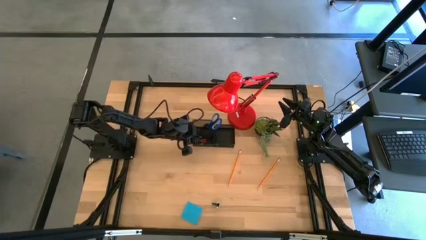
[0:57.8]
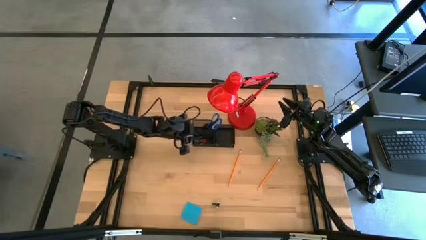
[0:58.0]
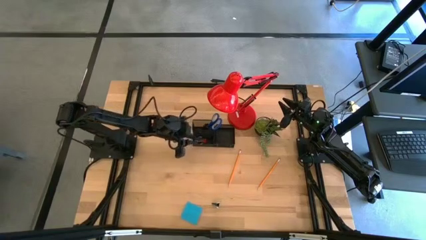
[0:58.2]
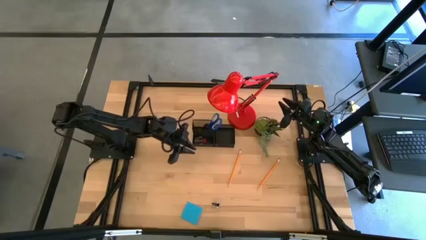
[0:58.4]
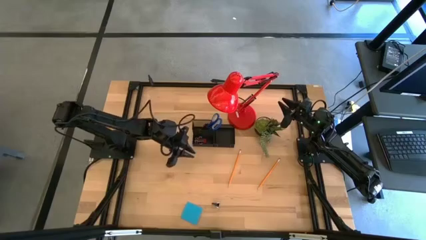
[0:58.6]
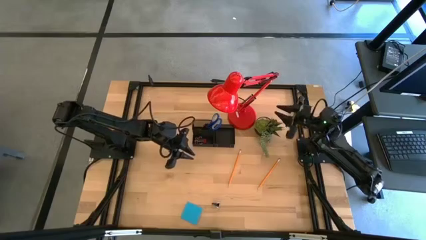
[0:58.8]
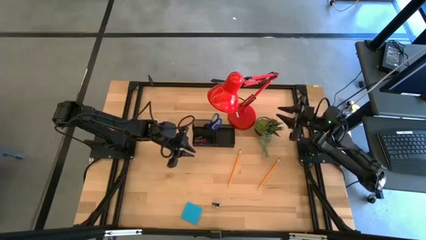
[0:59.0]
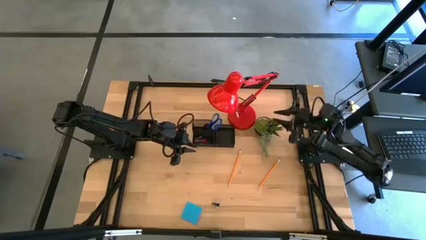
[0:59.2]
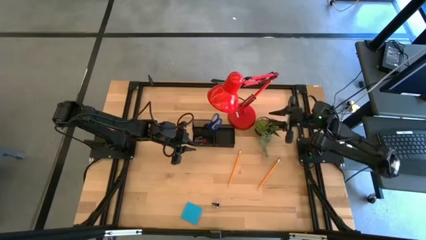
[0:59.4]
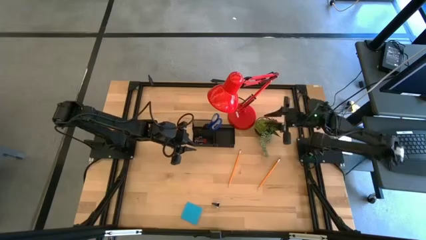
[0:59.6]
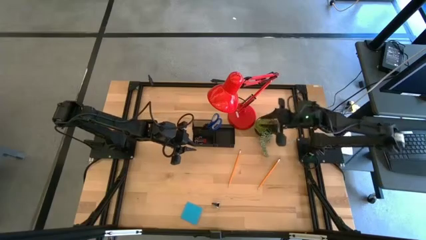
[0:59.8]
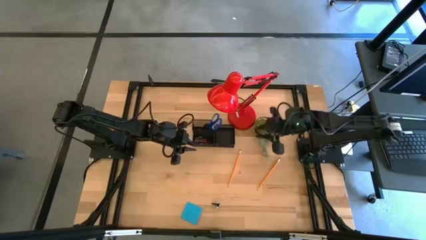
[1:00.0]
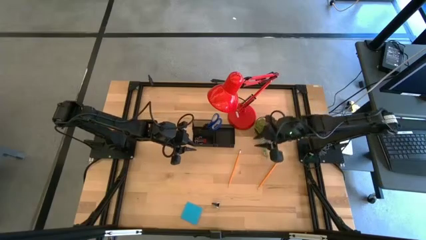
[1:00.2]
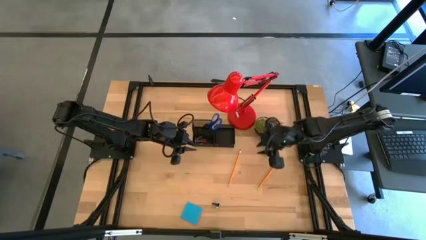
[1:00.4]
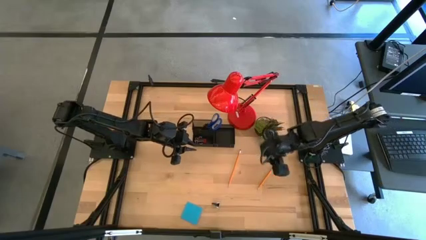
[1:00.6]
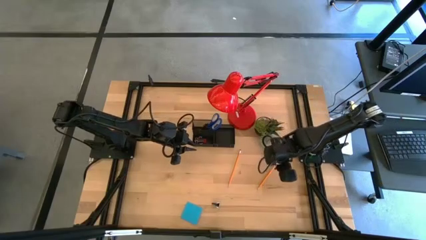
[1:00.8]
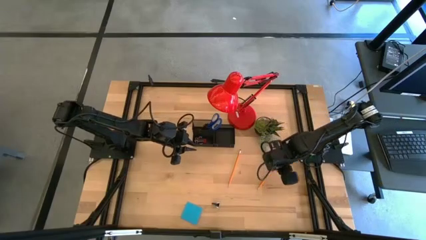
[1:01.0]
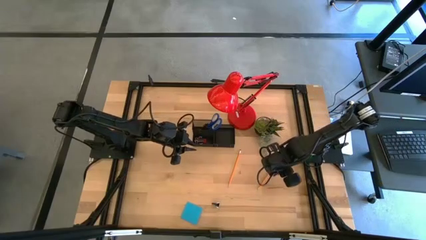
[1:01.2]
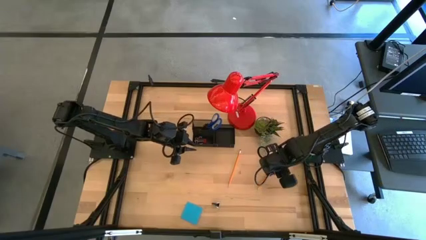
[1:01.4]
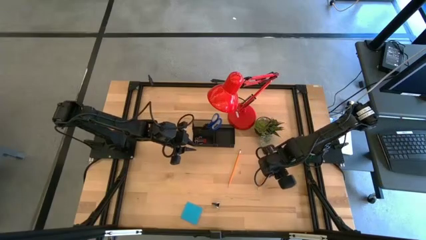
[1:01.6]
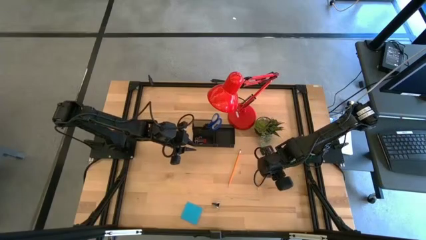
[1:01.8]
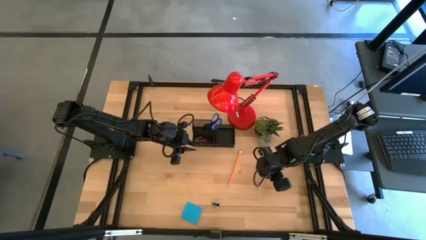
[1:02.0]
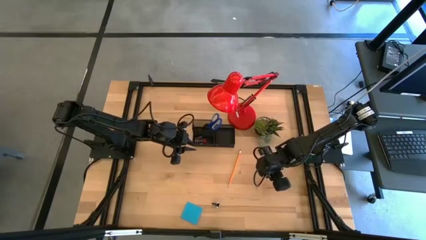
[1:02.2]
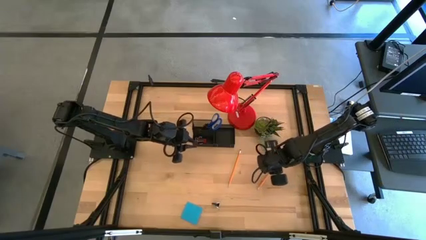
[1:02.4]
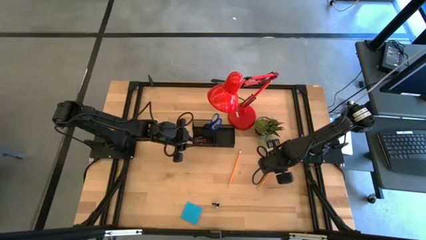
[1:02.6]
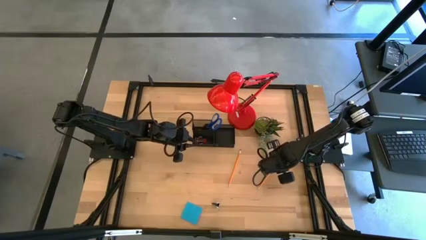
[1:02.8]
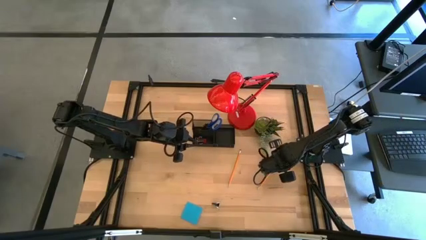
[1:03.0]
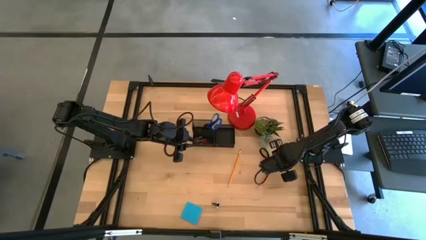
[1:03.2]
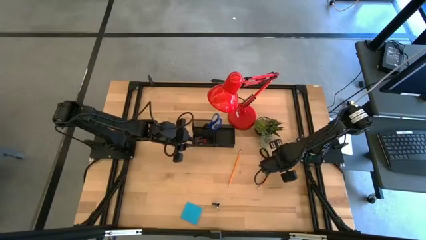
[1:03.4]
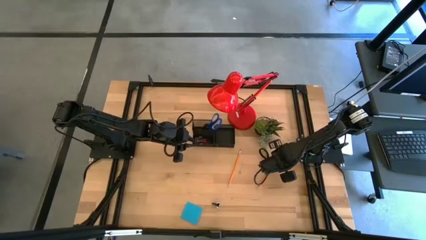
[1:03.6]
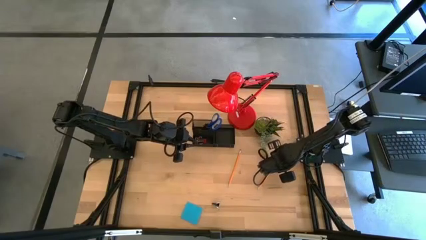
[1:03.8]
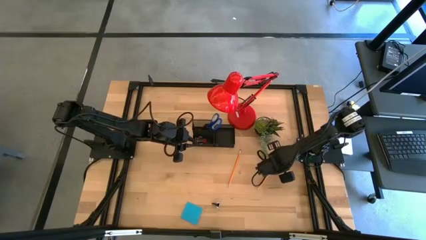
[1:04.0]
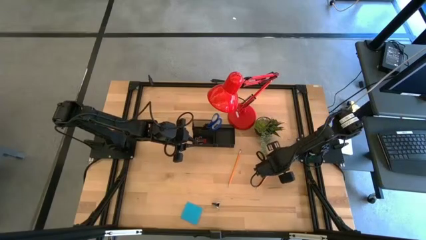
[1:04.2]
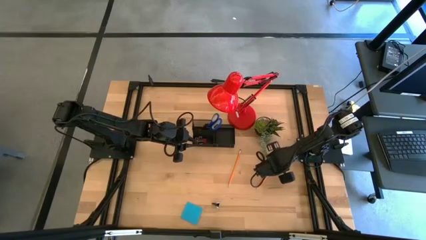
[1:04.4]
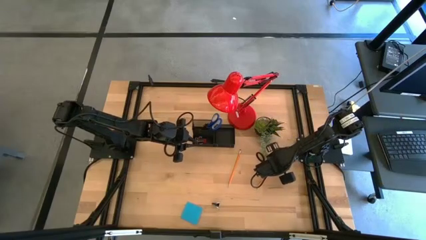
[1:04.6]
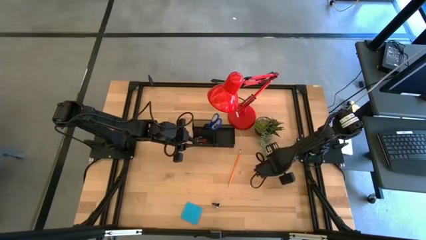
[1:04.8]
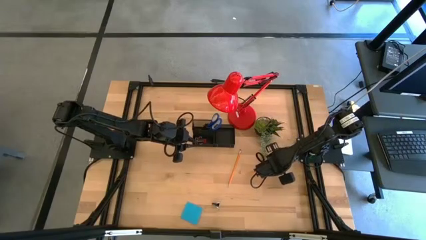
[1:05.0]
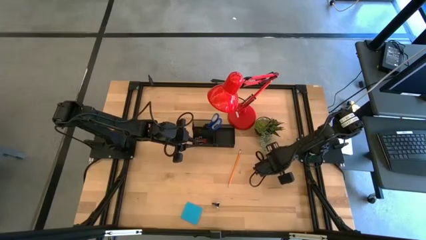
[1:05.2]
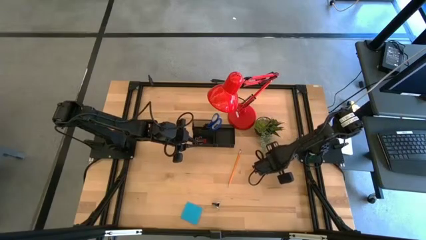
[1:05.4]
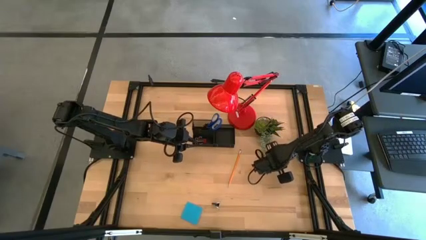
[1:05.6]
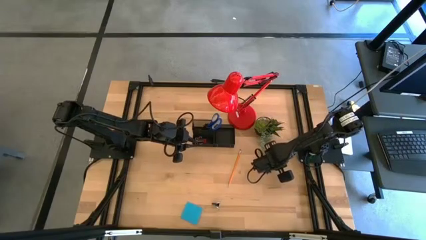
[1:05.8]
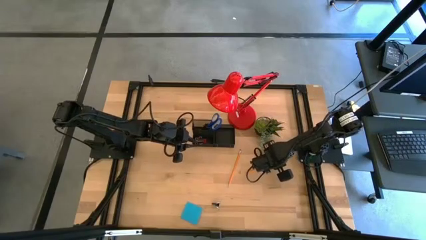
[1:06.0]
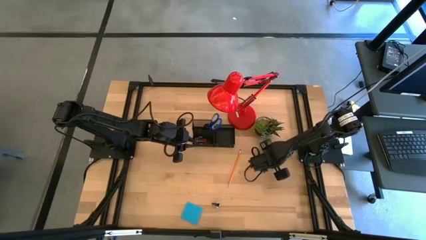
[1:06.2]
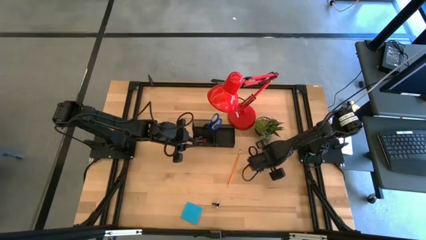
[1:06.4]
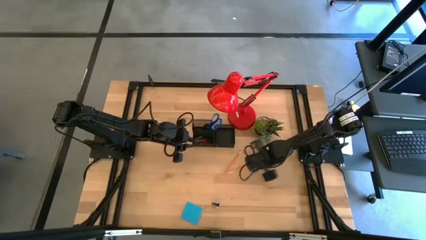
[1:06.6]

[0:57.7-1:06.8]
Task: Pick and place office supplies into organizer
Put the right orange pencil into the black desk organizer

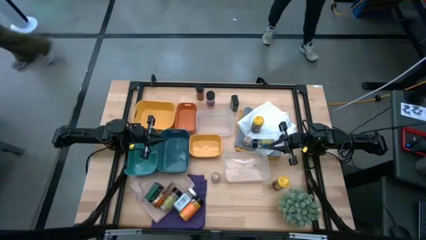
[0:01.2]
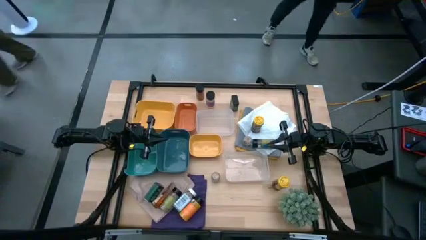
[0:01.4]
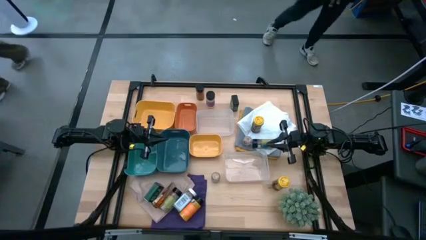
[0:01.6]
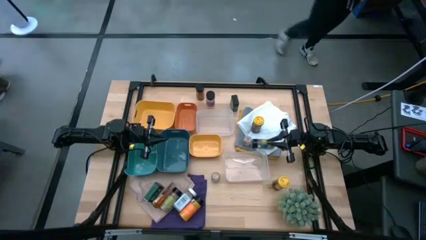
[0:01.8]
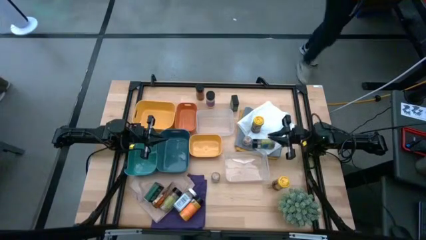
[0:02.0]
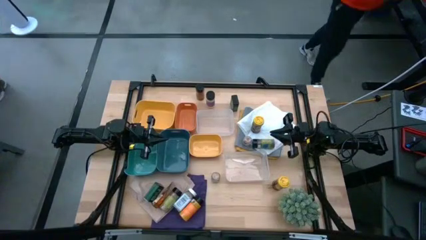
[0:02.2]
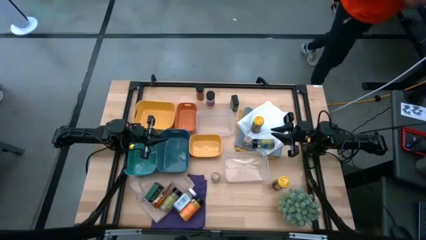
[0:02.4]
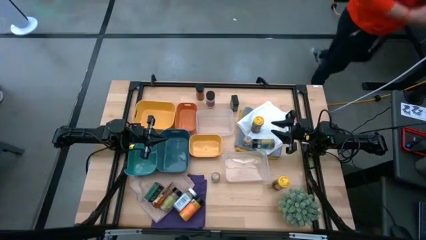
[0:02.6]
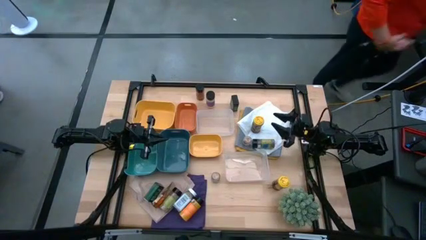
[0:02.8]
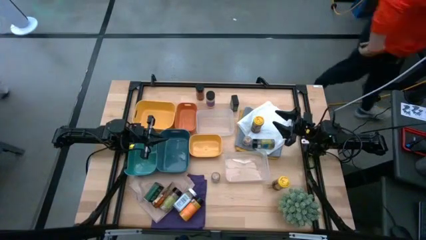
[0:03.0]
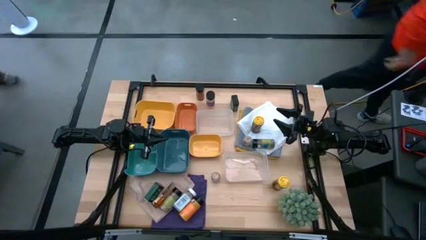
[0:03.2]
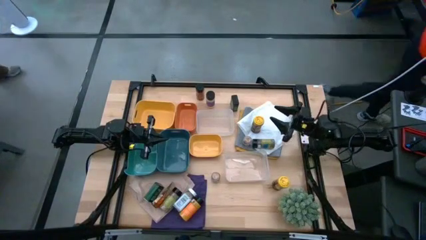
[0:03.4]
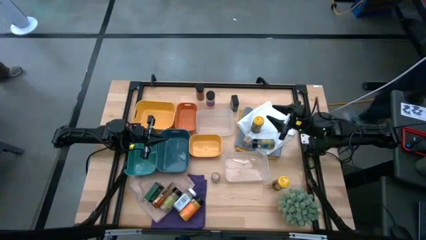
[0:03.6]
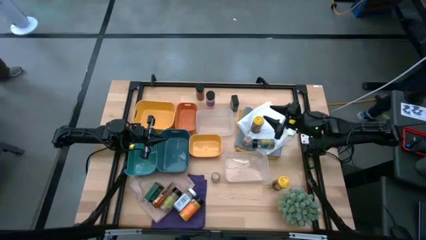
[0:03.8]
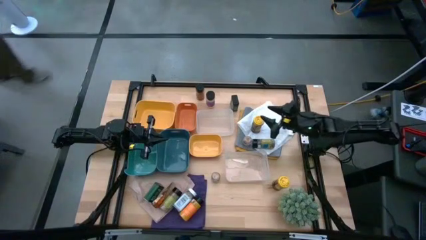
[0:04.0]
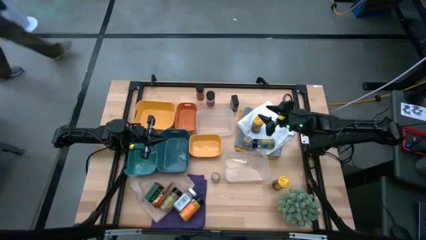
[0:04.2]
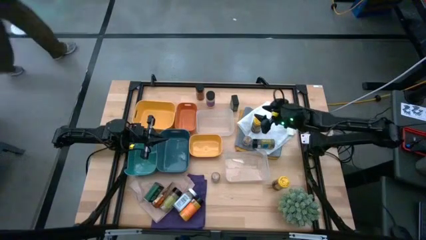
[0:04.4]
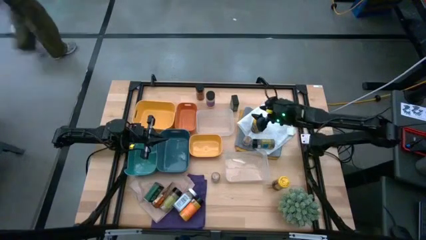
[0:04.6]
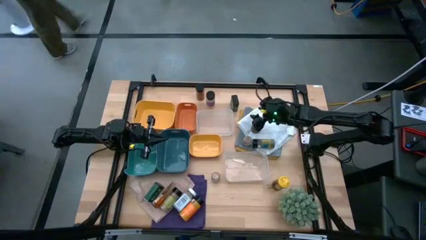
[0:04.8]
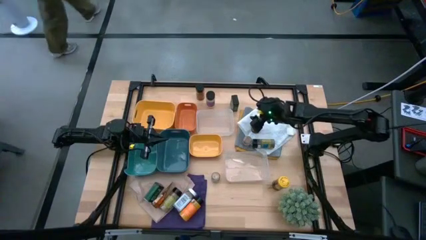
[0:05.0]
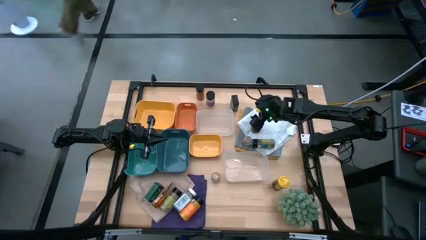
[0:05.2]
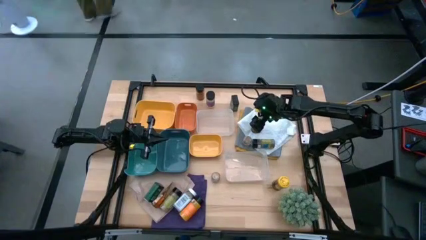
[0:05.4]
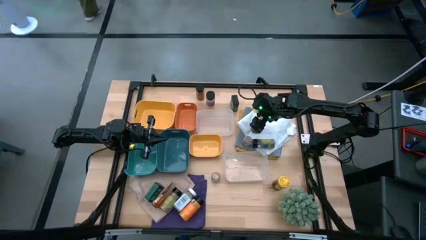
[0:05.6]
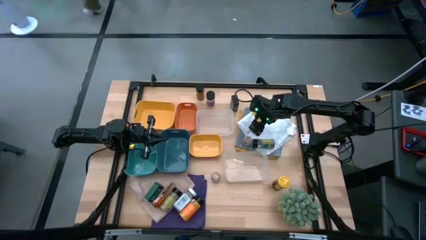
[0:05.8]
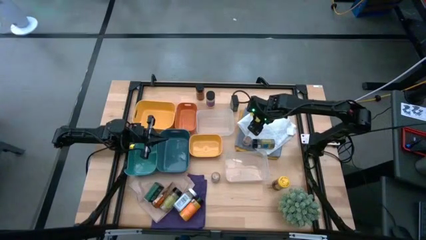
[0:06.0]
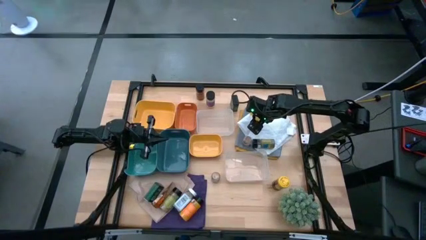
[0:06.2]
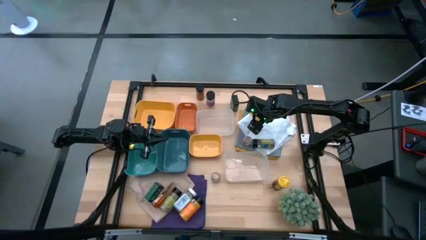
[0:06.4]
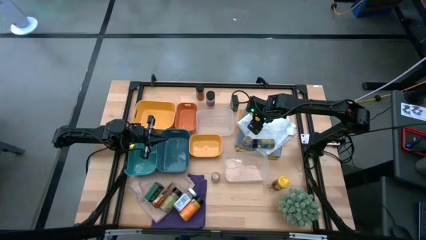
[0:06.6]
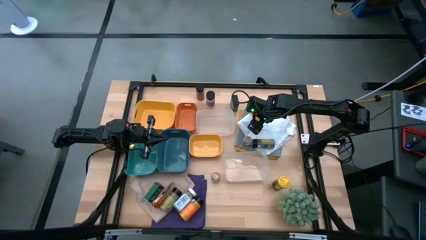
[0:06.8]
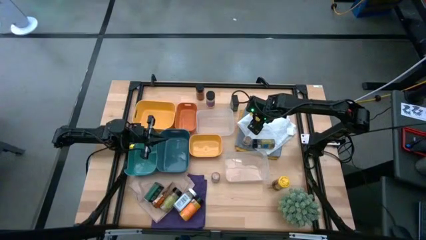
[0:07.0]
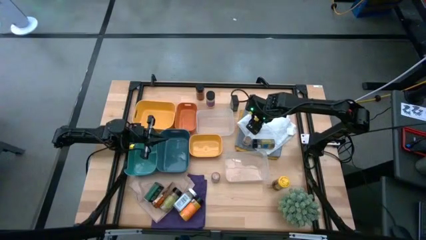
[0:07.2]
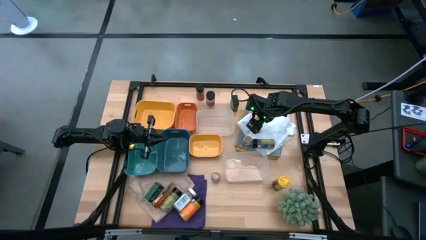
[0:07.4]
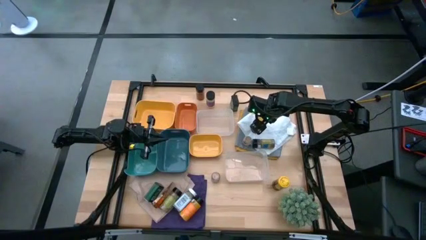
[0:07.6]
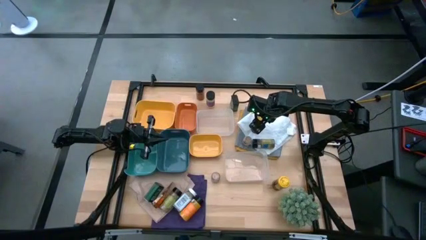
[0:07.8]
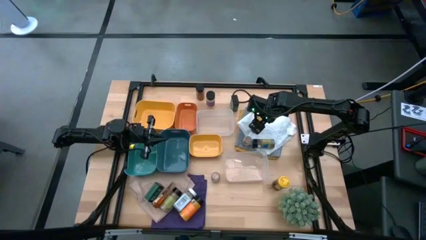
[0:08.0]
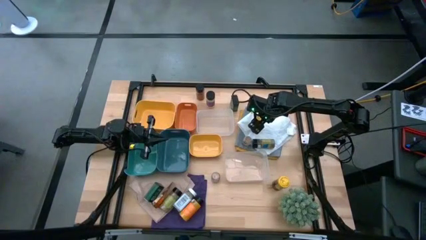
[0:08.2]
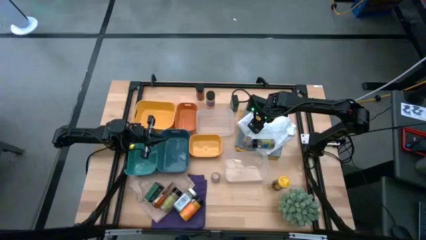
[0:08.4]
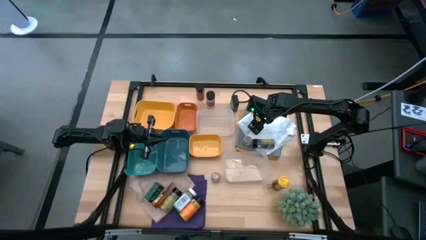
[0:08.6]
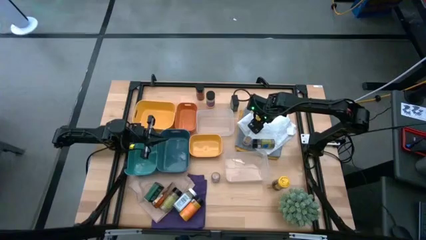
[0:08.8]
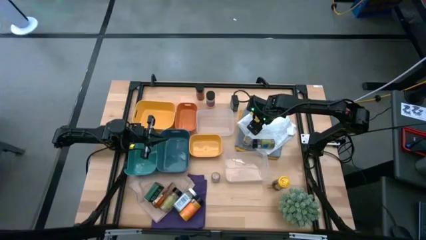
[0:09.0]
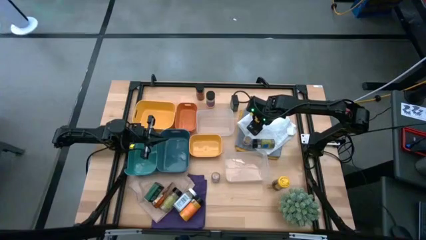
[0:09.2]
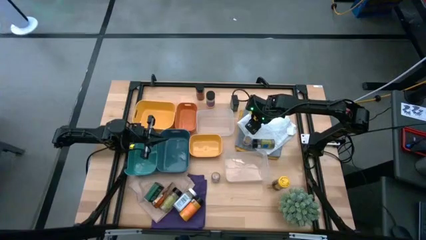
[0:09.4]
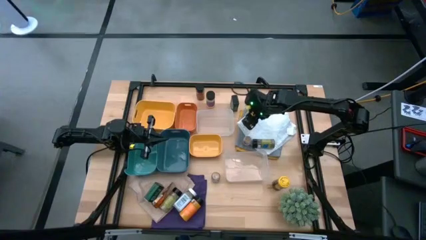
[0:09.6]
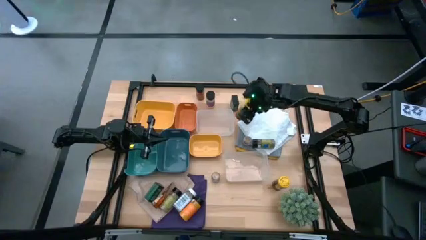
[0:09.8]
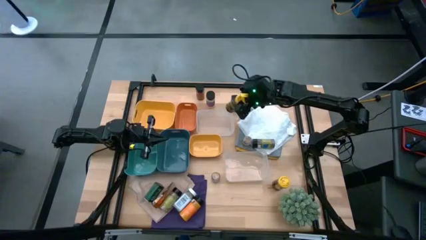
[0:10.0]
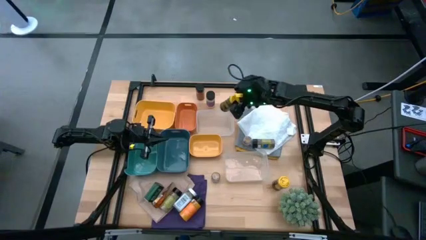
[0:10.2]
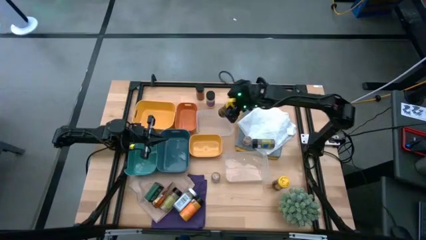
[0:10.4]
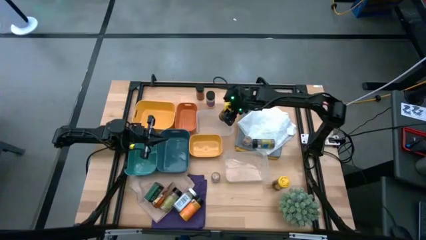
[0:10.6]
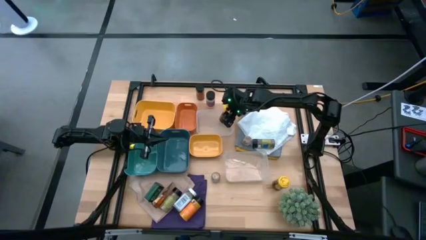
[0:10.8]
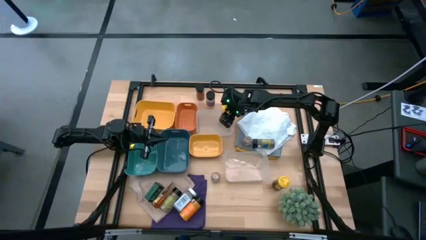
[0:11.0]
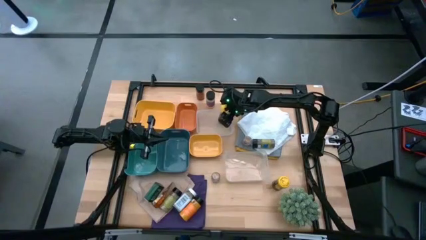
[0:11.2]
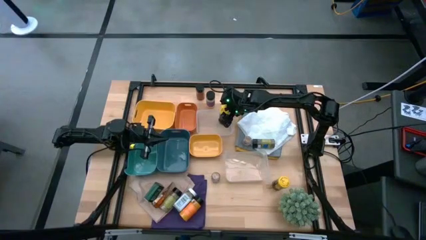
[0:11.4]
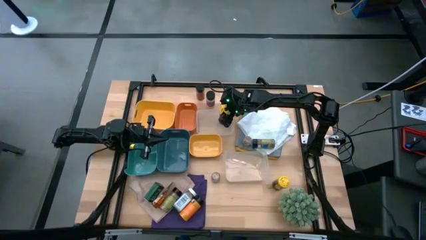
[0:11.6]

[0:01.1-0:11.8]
Task: Sort spices by type
Put the top yellow spice bottle into the top transparent bin
